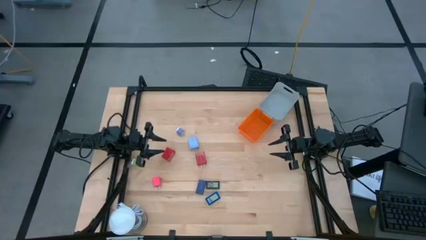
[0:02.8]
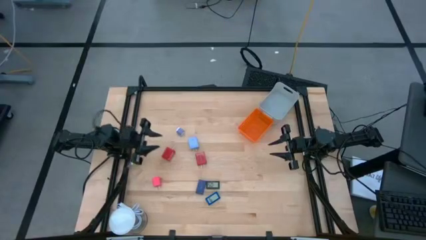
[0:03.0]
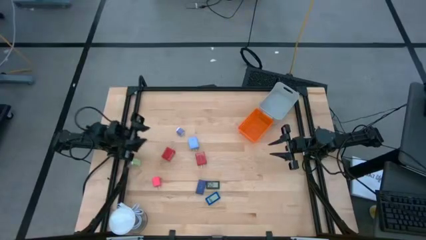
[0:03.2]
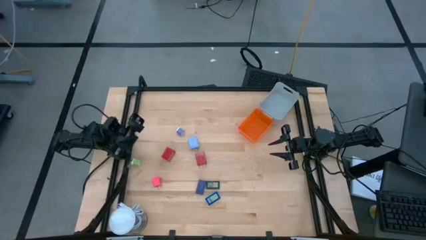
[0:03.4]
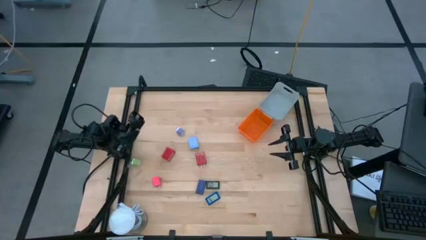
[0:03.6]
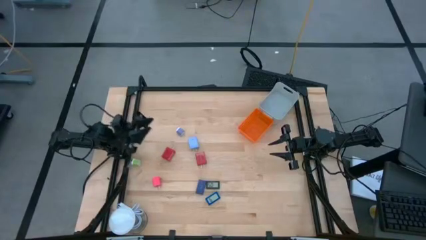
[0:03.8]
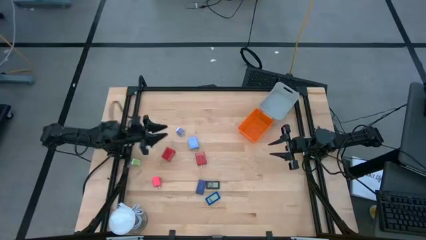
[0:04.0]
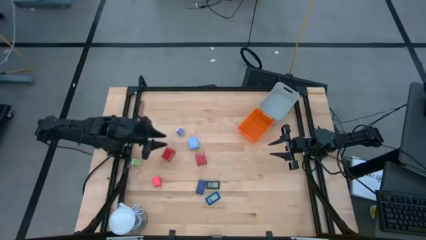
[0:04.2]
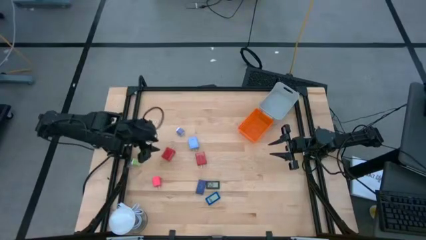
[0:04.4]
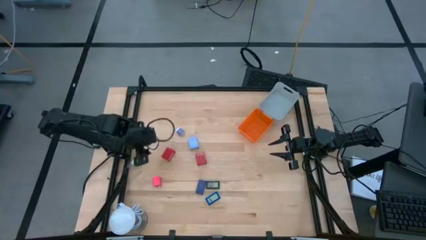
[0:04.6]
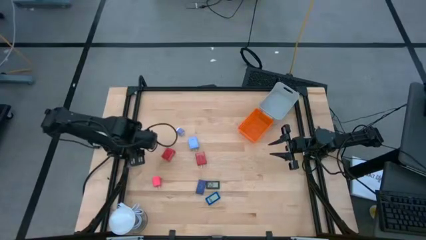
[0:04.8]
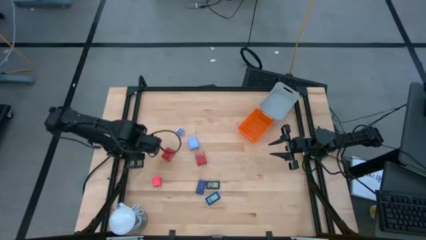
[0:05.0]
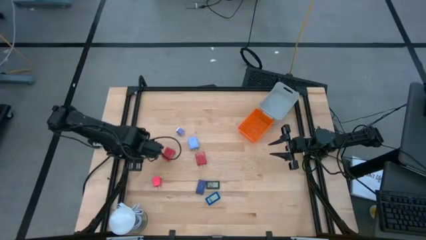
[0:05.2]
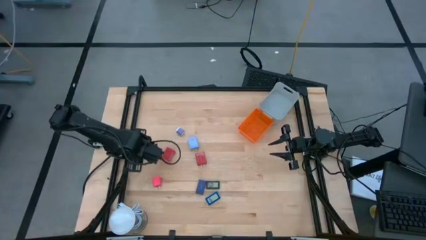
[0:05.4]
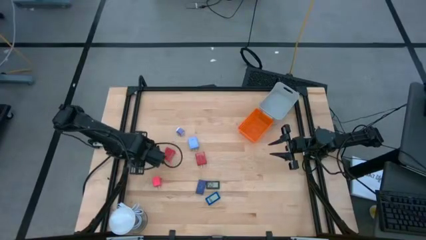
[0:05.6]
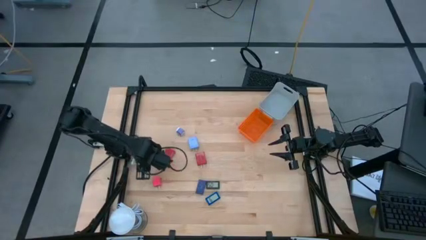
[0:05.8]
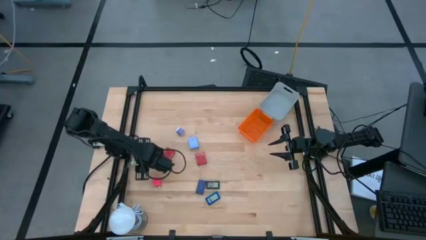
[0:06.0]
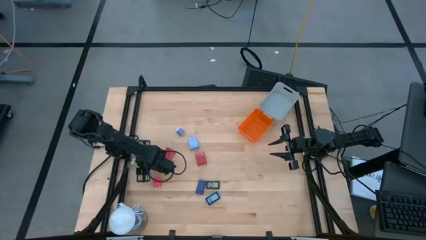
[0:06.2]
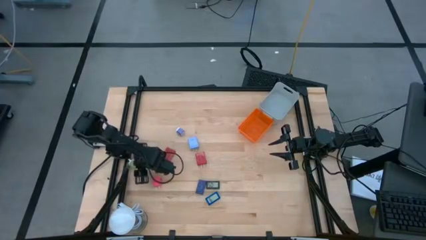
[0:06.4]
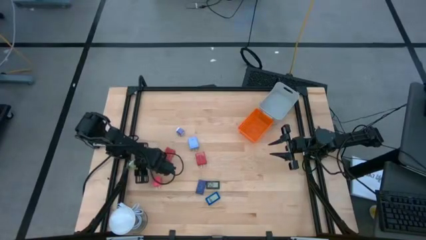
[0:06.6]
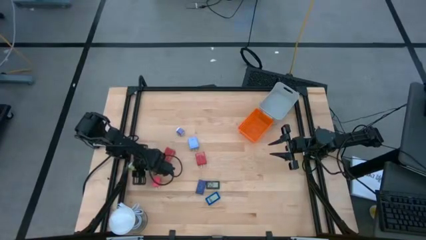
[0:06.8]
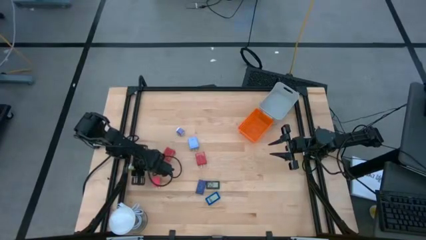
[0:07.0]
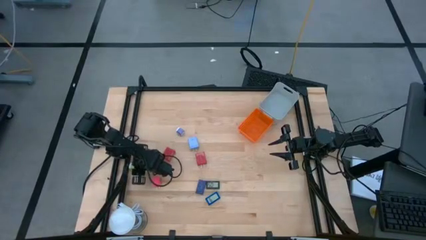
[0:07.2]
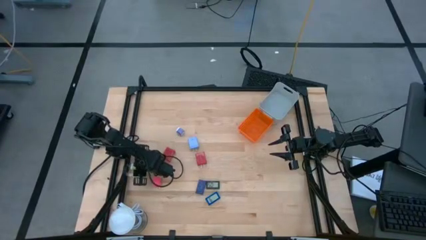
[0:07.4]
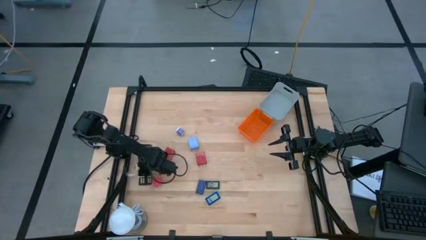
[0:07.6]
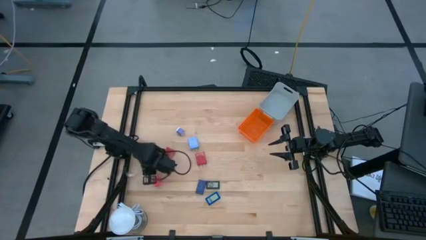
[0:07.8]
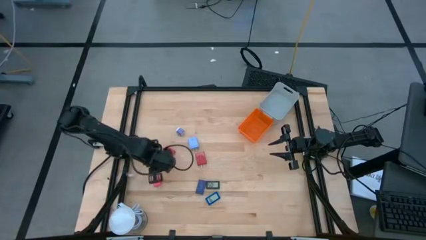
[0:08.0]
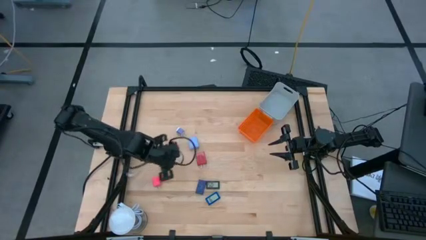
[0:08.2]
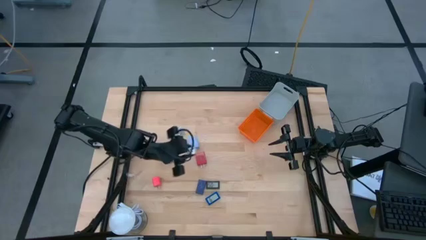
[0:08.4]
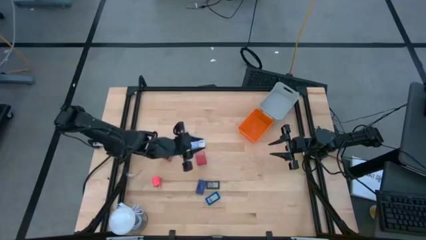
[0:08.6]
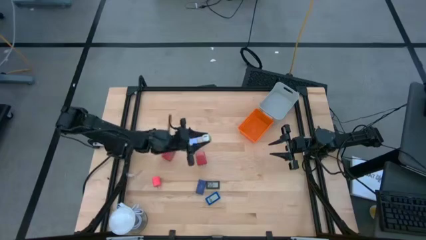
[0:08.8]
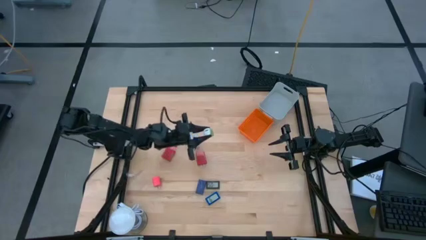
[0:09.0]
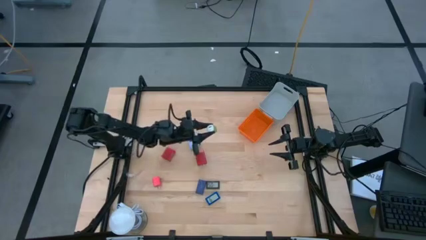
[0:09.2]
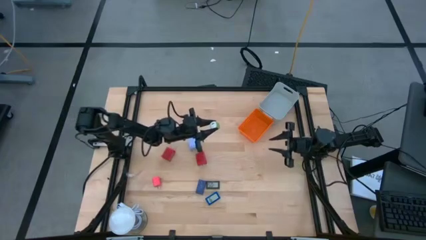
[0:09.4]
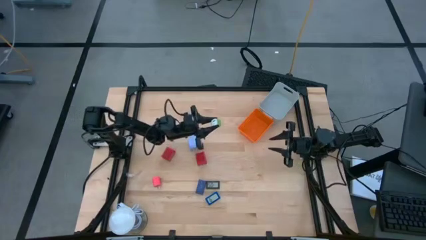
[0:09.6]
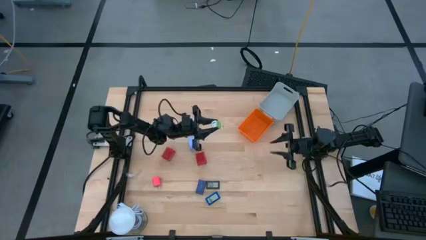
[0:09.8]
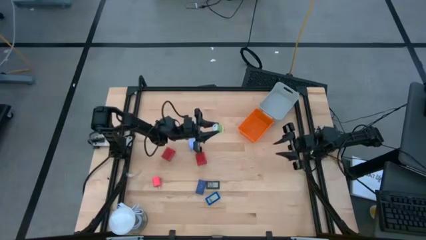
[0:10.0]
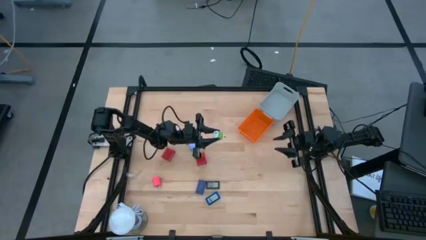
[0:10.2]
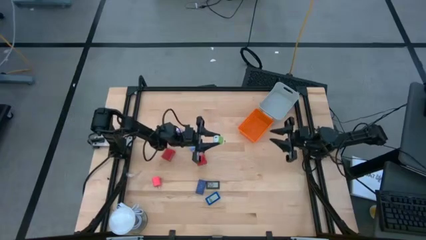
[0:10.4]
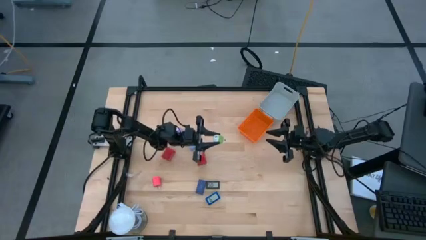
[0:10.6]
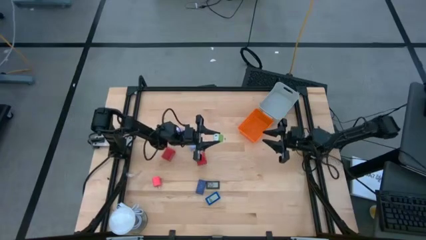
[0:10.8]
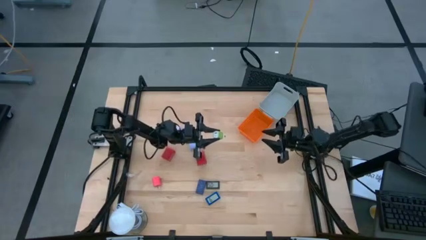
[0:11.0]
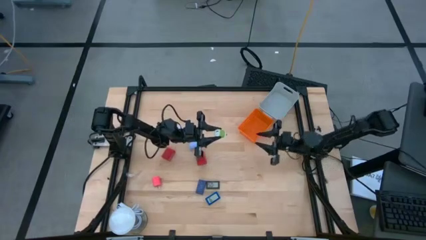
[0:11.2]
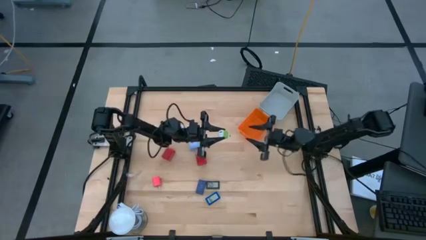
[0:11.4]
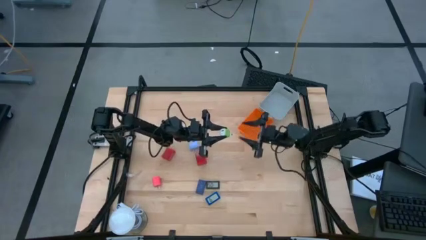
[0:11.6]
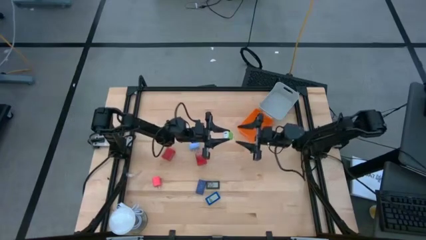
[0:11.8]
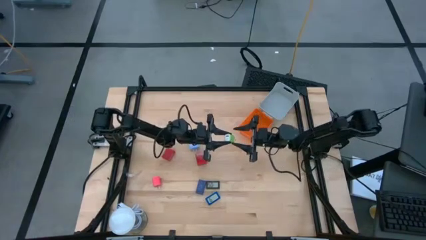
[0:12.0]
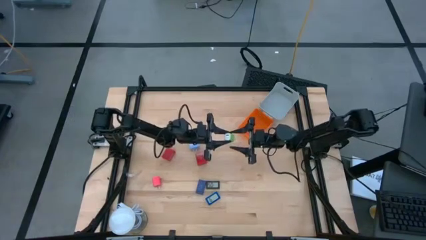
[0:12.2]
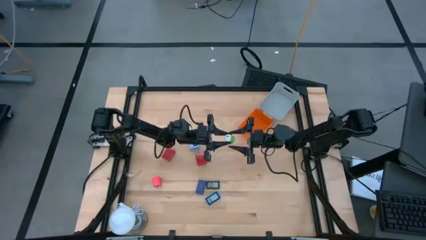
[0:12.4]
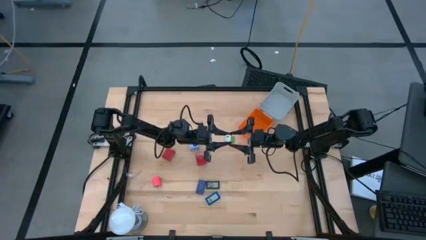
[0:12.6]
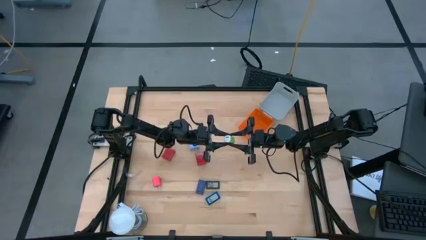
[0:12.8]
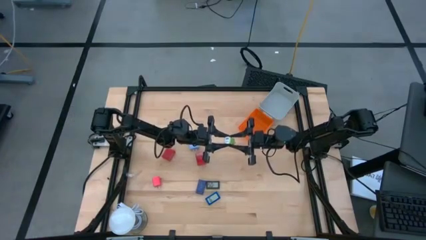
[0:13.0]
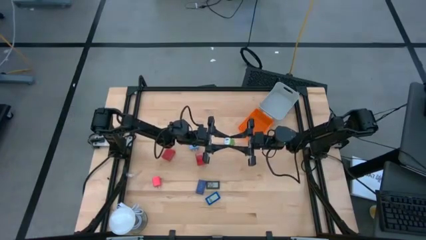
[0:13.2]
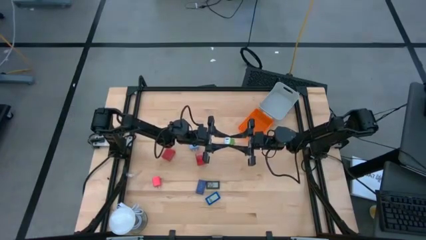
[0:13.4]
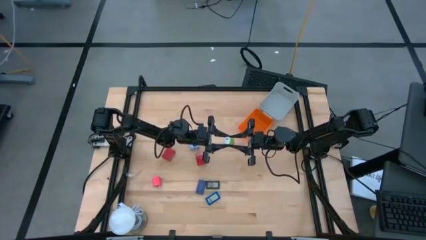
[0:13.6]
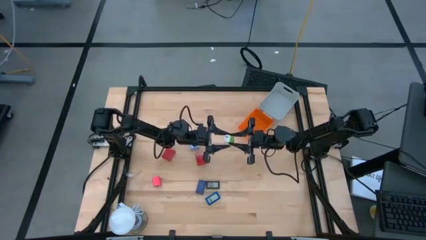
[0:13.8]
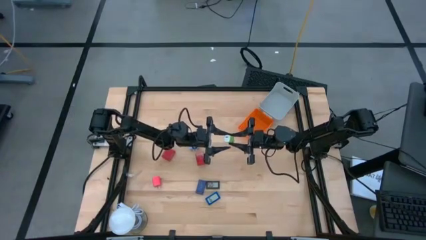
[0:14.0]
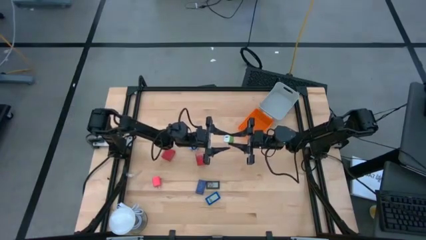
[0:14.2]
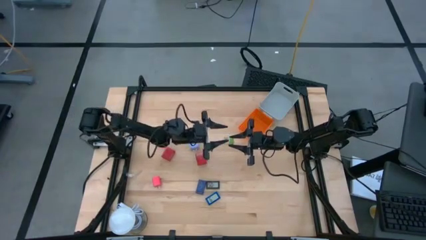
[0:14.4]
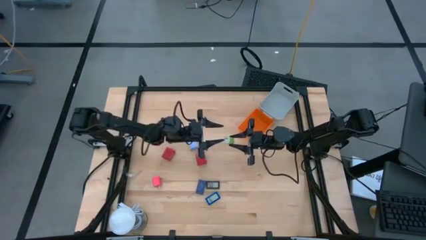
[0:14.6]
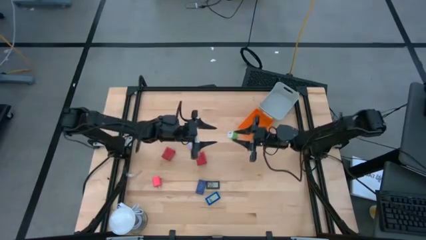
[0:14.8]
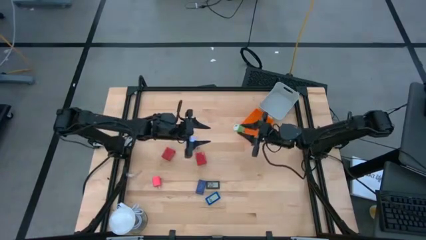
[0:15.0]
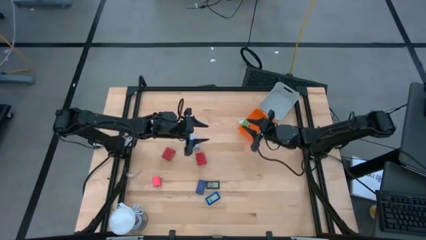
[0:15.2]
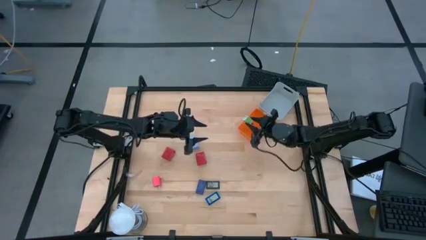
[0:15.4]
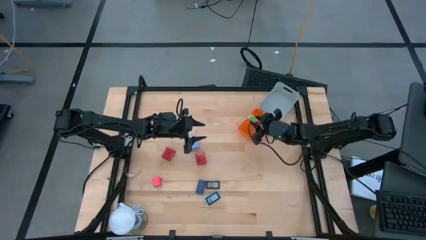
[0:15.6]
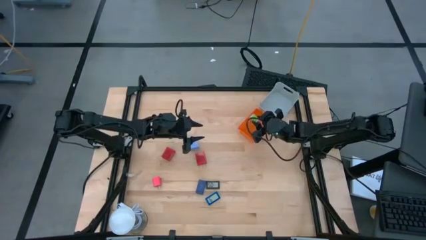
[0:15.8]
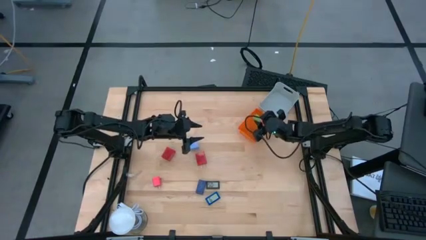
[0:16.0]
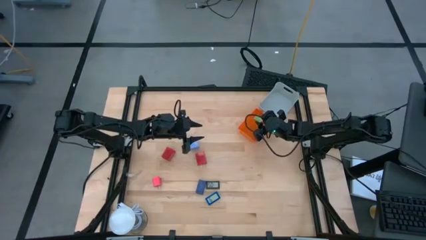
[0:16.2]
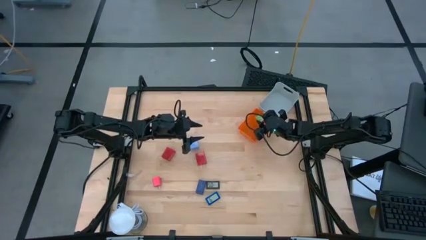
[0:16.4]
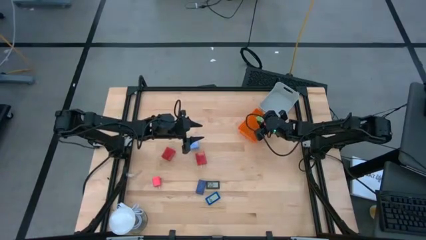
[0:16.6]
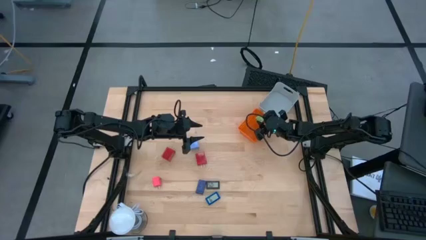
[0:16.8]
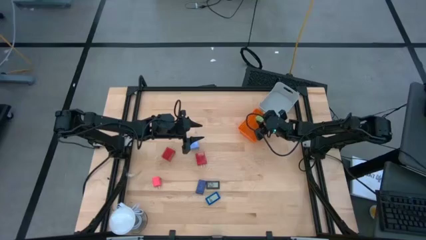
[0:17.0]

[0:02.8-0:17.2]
Task: Pick & Place Office items
Put the green charger adapter into the orange bin
